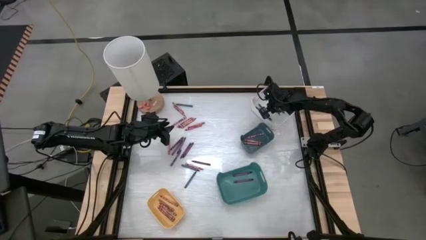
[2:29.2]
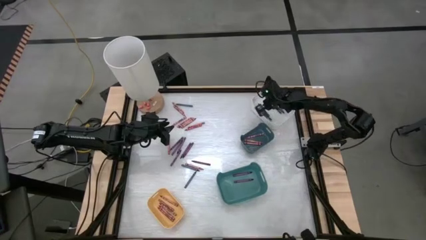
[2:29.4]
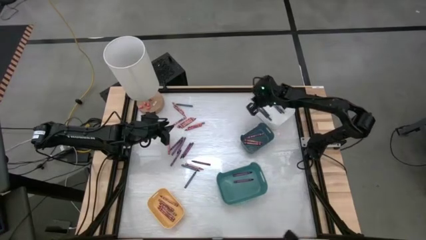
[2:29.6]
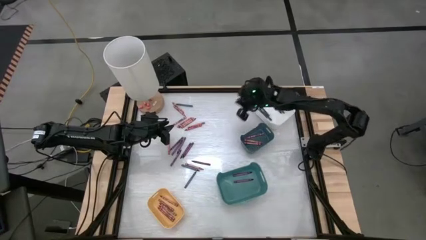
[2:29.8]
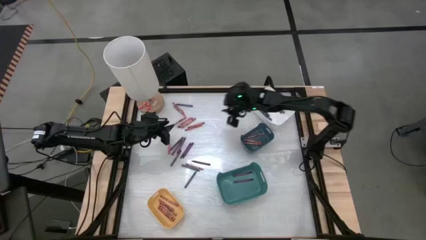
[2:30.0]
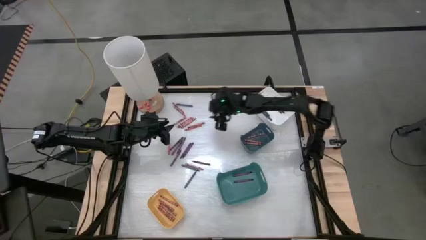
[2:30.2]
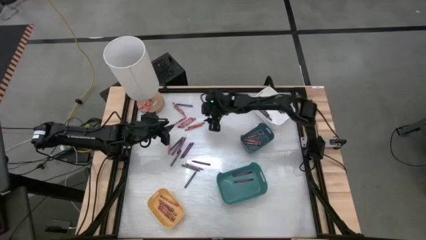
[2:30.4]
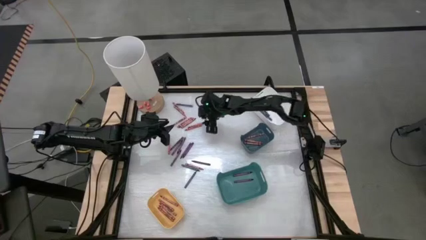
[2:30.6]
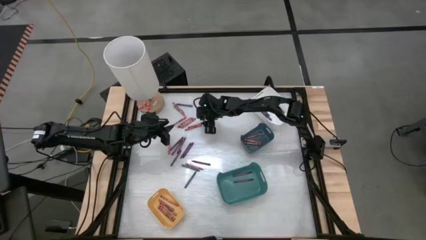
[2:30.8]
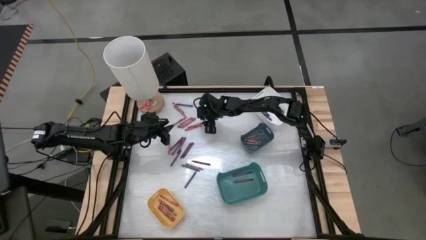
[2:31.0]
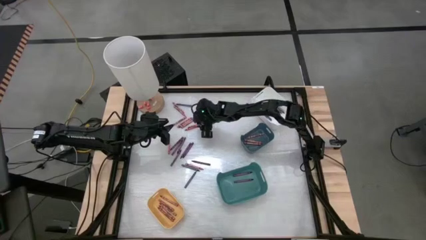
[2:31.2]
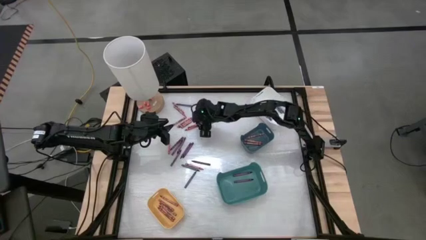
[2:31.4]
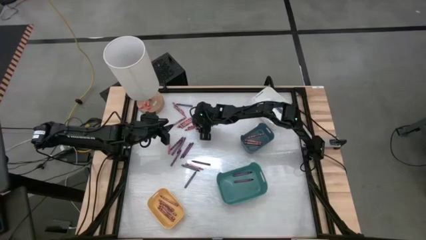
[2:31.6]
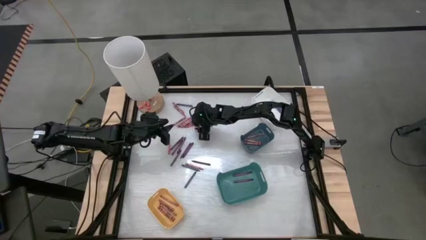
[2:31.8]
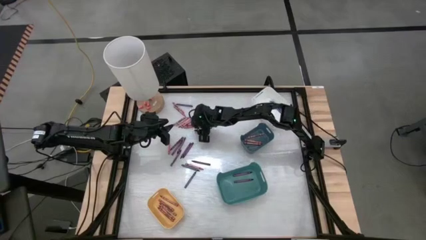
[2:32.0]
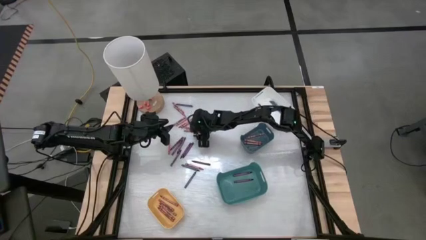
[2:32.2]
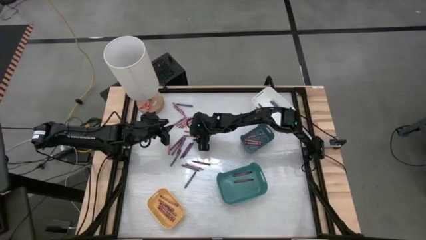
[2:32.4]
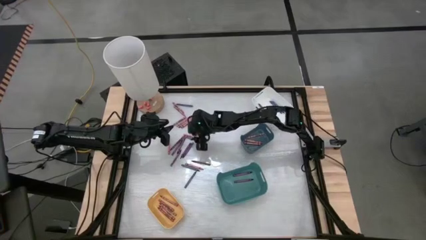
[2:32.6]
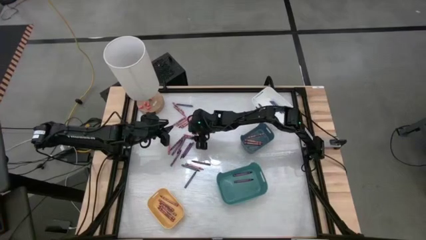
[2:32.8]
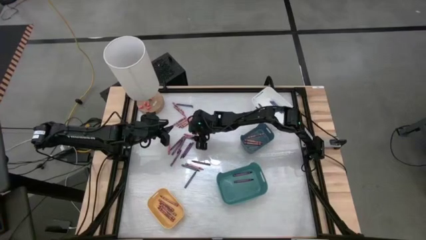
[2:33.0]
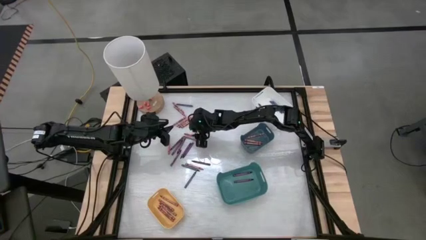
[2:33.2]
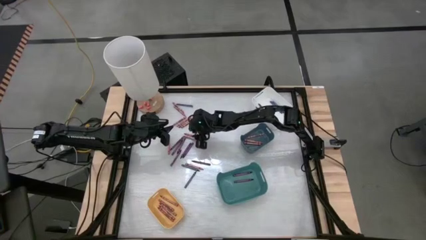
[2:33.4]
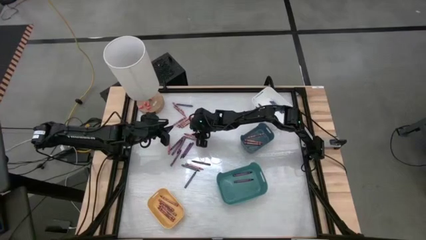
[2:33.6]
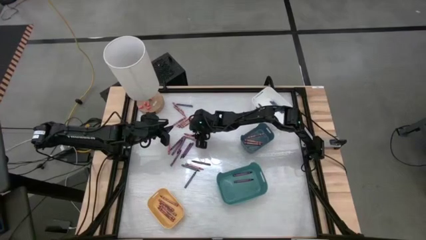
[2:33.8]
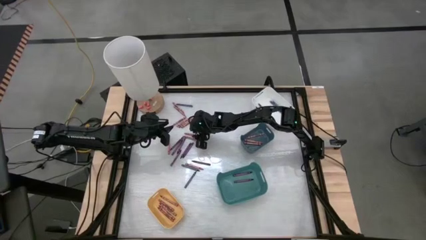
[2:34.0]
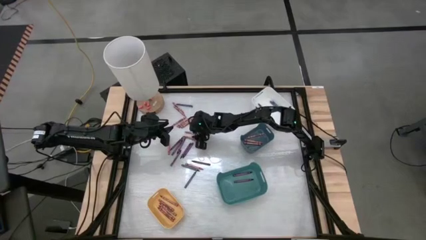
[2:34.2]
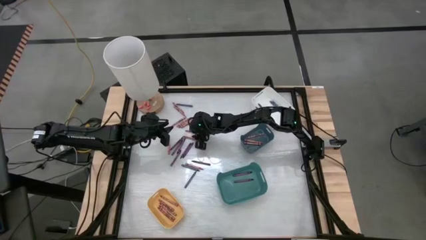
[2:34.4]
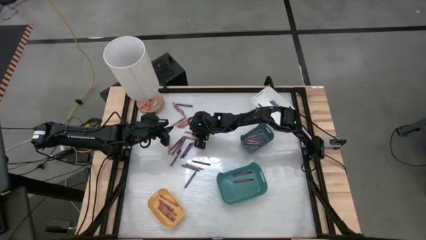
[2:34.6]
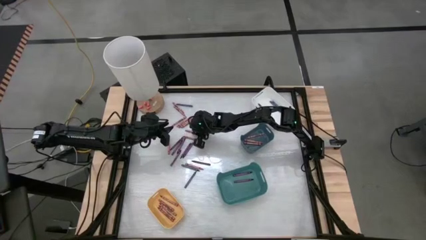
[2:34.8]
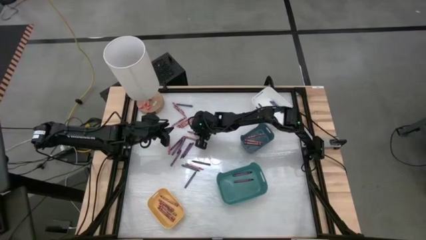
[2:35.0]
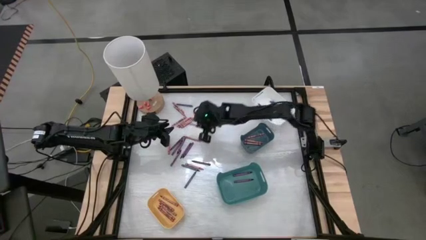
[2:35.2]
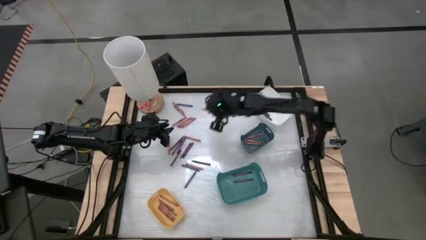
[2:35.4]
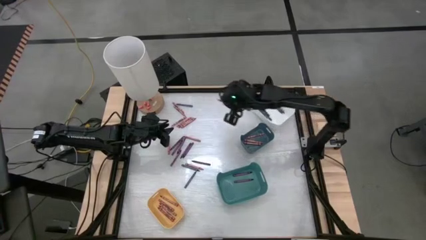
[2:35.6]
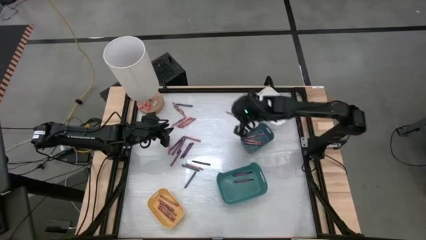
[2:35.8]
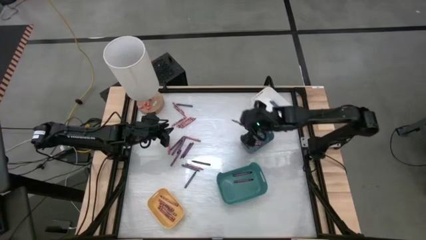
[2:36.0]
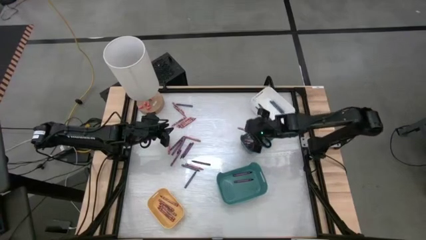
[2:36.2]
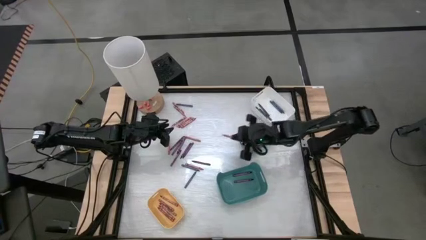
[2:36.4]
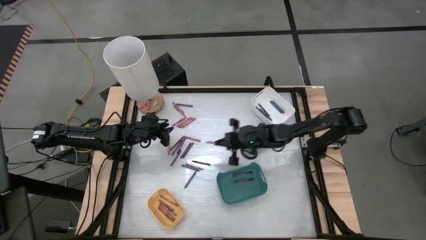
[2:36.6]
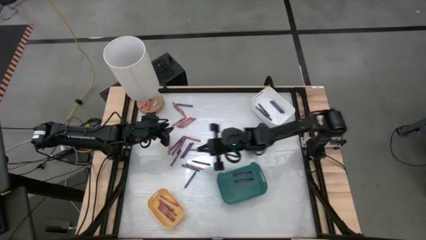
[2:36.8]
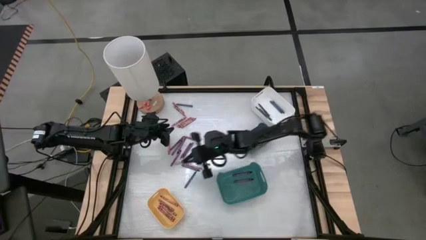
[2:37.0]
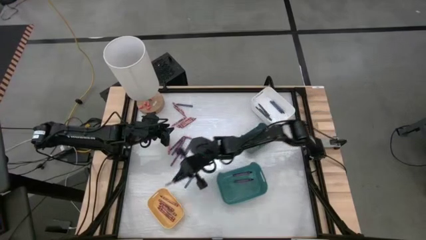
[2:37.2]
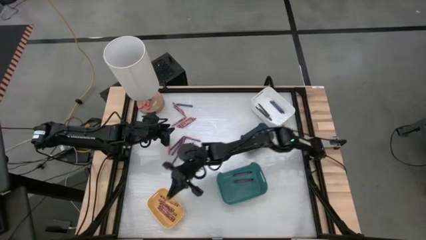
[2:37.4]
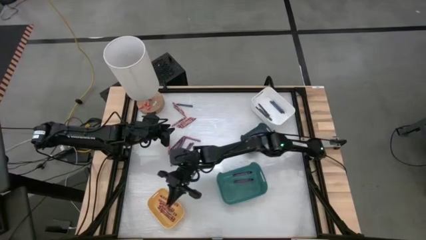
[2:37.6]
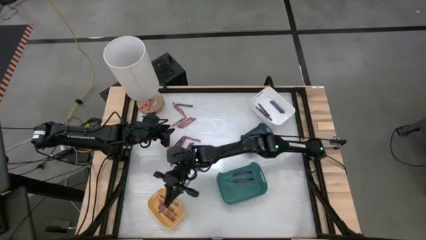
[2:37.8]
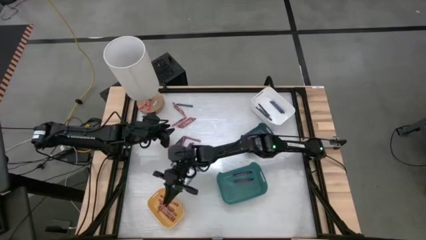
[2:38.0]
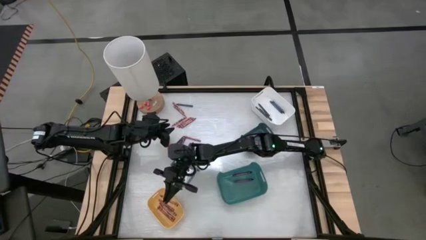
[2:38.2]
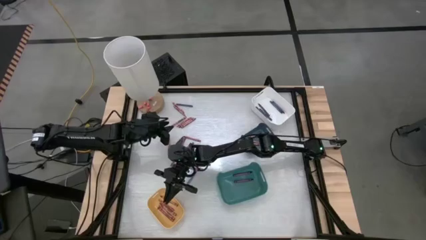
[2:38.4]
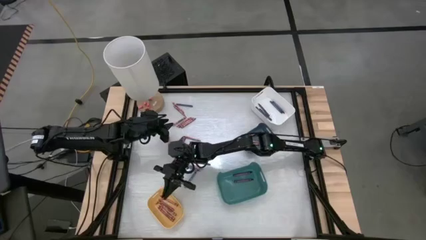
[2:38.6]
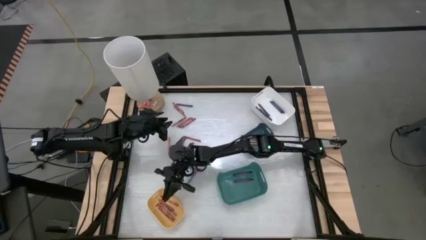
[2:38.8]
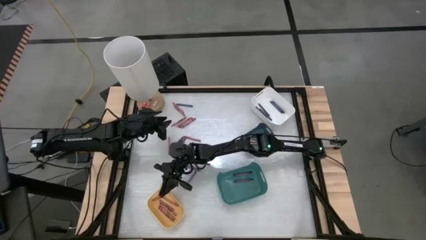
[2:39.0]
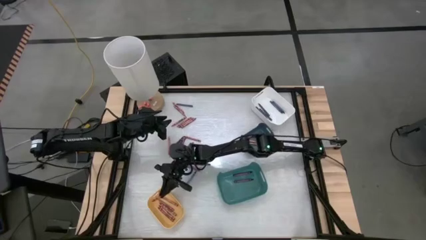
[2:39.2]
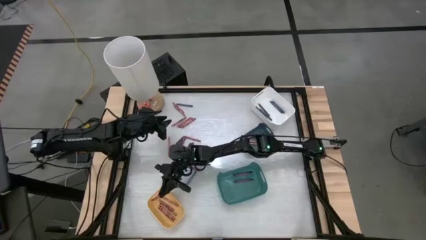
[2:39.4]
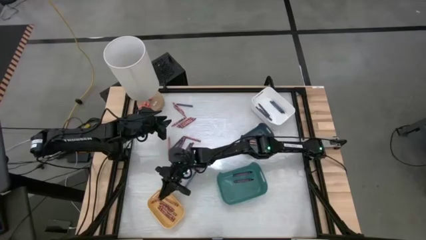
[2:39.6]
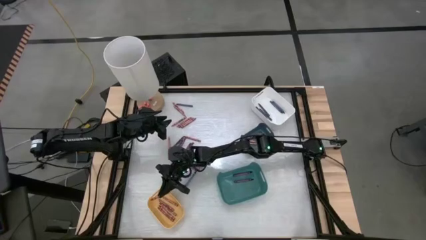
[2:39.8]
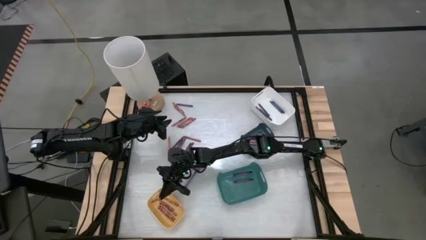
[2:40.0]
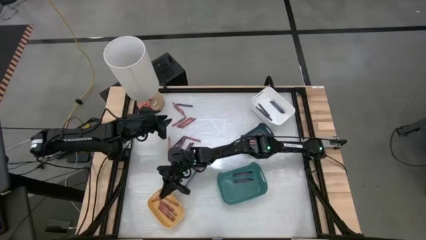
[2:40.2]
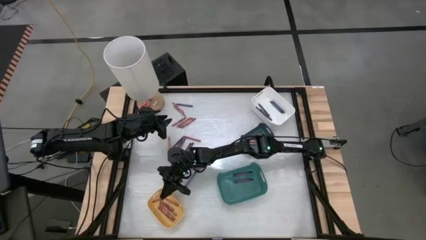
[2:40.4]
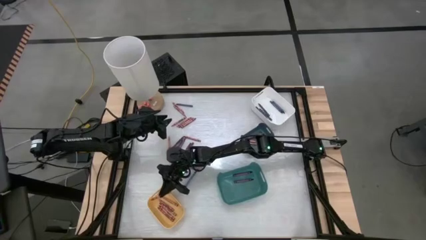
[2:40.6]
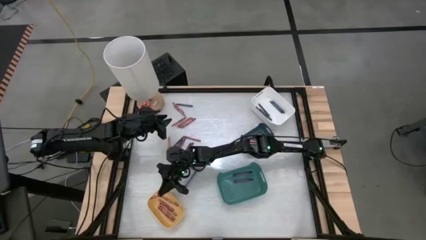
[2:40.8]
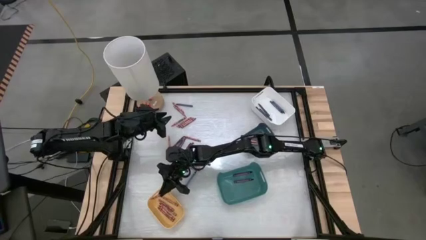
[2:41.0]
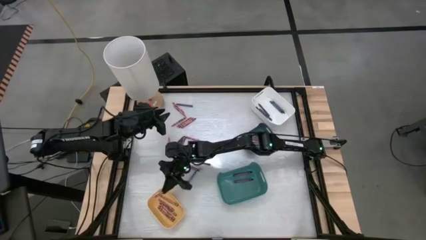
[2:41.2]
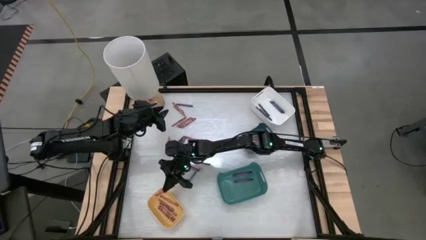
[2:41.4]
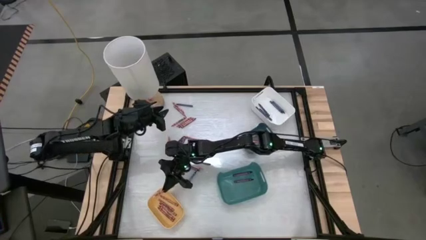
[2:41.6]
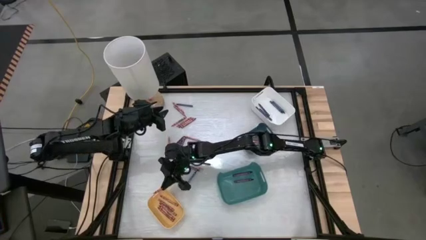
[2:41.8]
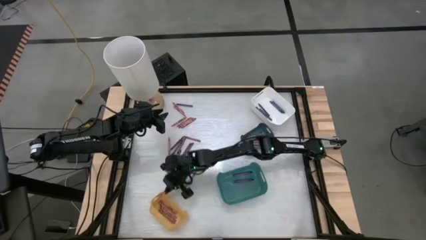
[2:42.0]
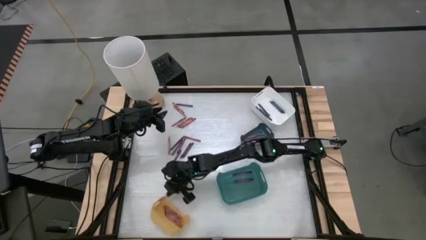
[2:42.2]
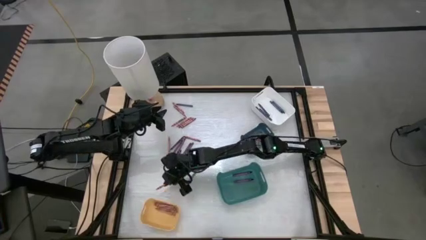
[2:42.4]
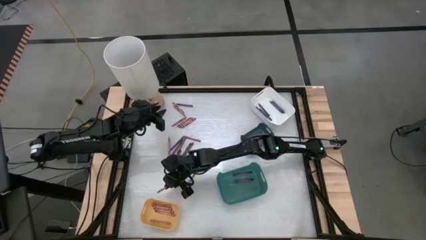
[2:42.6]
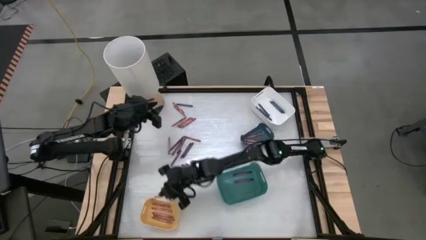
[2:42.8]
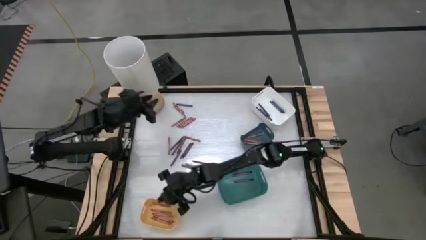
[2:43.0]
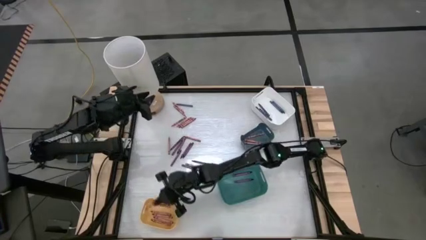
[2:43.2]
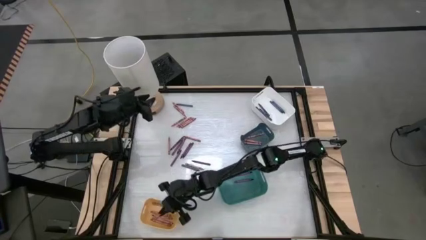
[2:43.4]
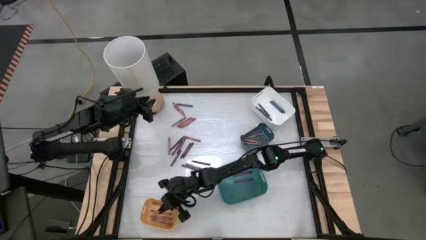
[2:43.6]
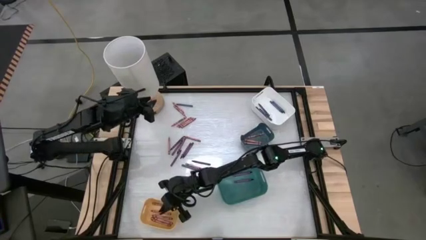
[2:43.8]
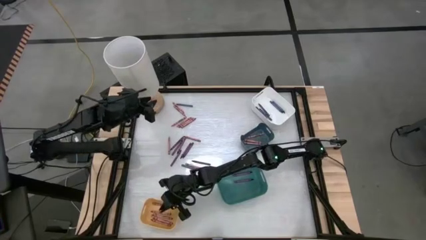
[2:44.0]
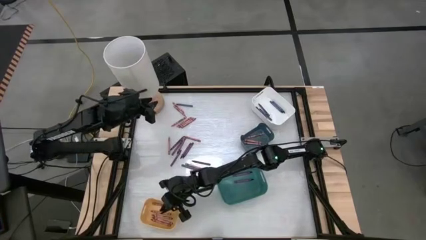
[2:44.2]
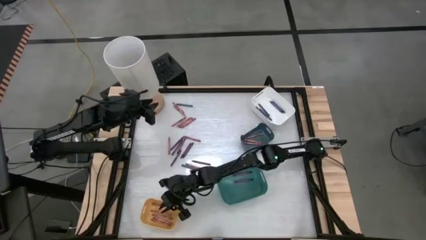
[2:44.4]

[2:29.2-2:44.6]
Task: Sort crayons
Put the red crayon into the yellow bin

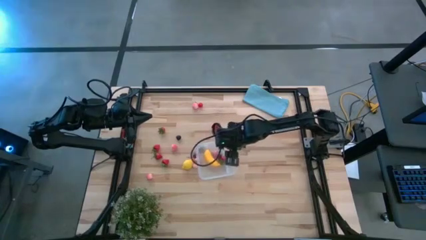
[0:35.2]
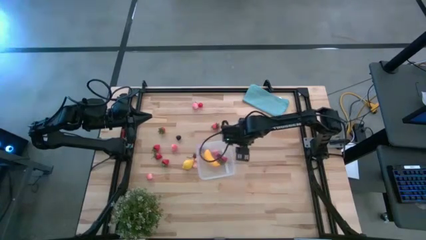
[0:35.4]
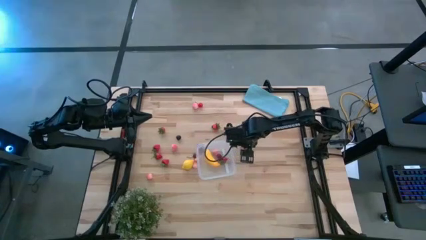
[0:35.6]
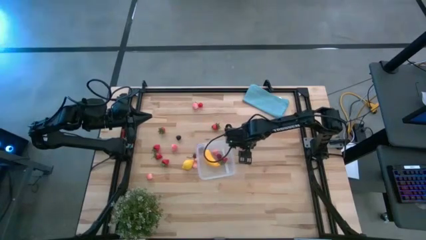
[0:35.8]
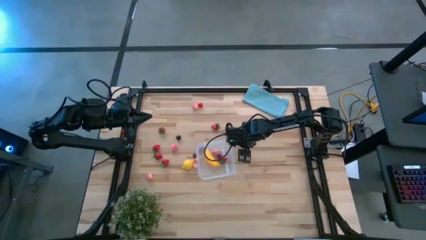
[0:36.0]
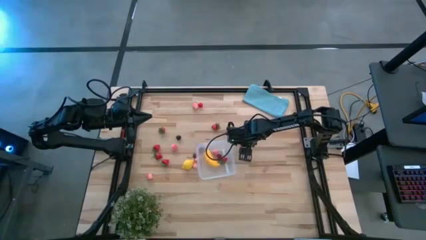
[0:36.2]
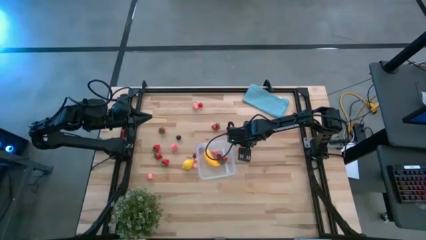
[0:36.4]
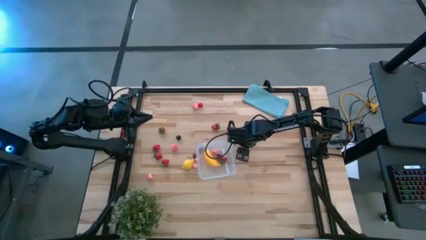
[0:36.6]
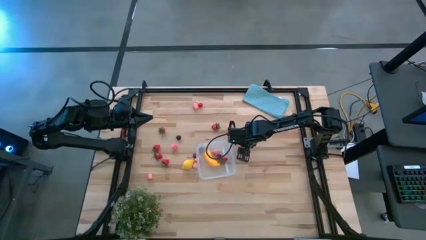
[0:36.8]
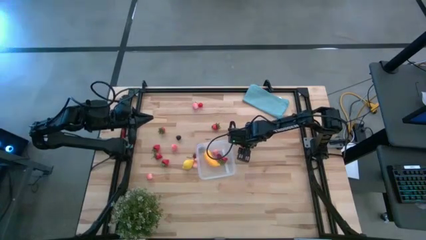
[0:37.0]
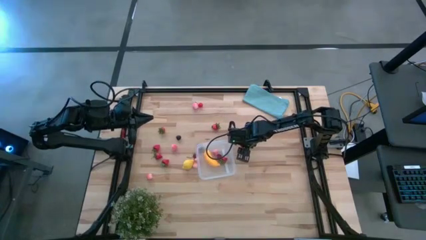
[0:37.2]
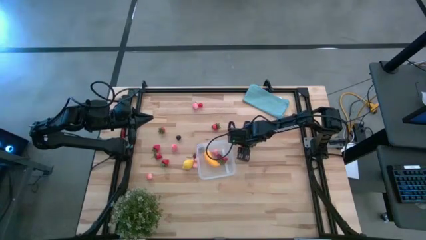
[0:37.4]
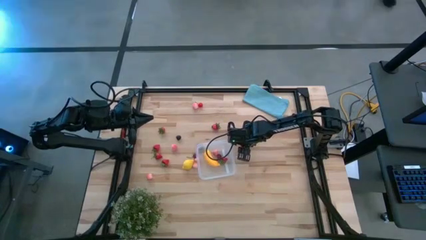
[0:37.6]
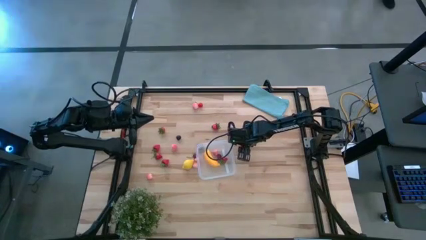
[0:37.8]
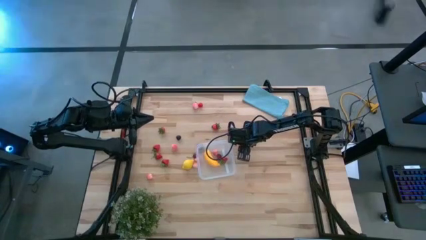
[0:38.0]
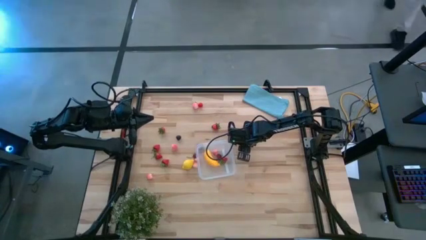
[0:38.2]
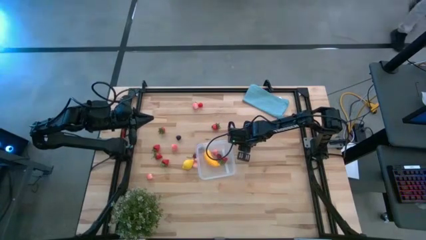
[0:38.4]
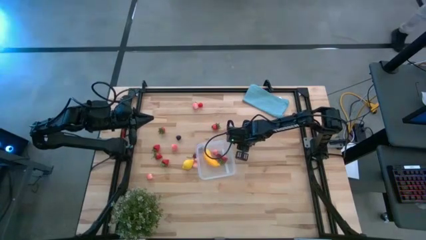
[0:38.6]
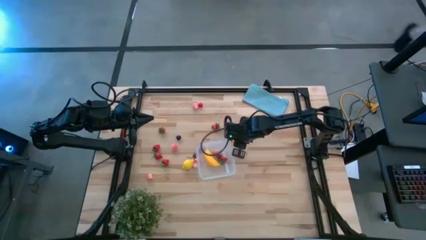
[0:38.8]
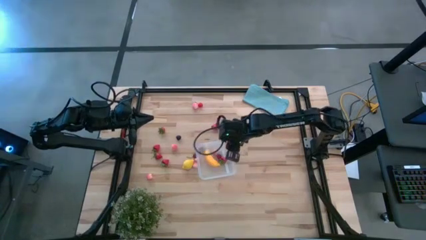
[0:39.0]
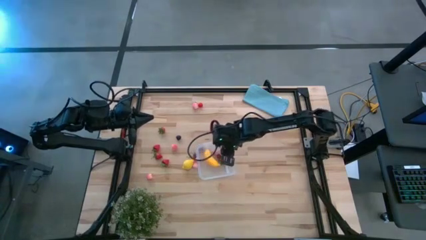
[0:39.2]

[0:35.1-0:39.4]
Task: Pick and placing Produce into tupperware
Put the red cherry into the transparent bin
